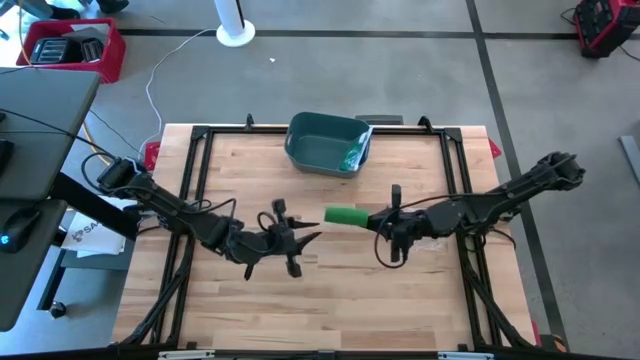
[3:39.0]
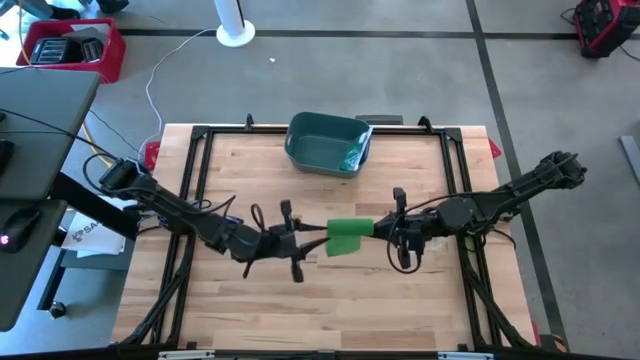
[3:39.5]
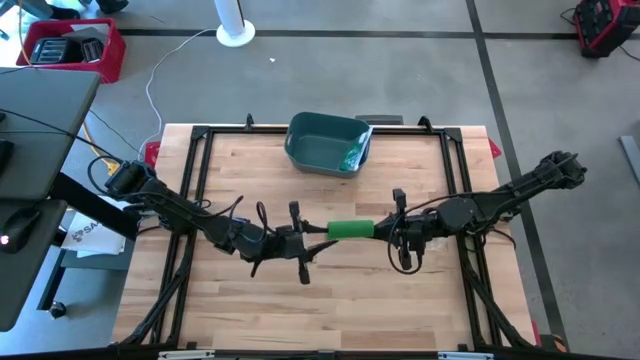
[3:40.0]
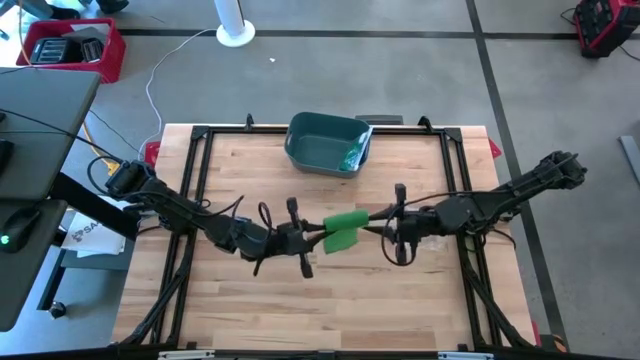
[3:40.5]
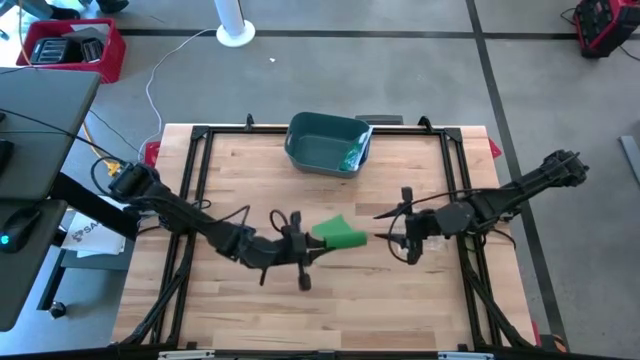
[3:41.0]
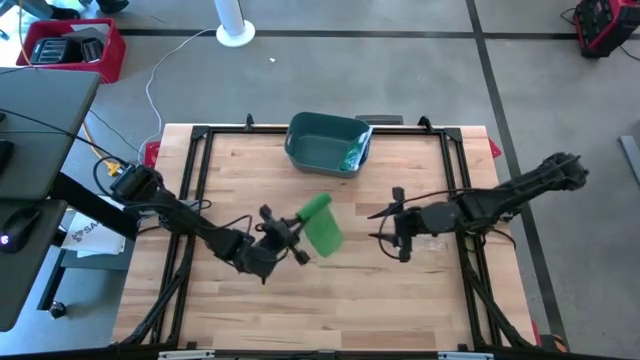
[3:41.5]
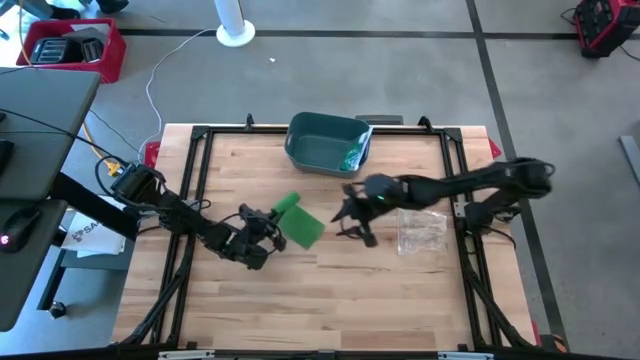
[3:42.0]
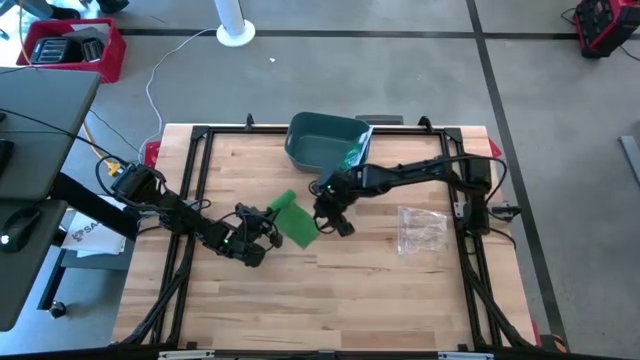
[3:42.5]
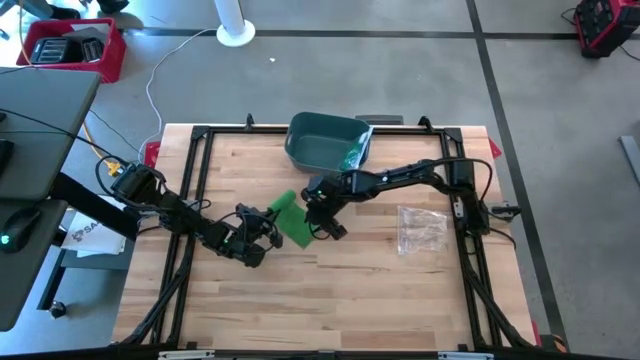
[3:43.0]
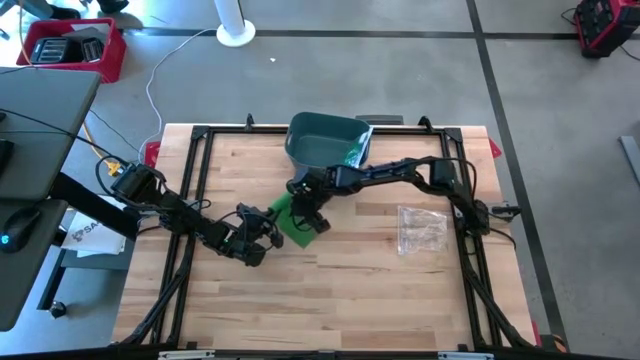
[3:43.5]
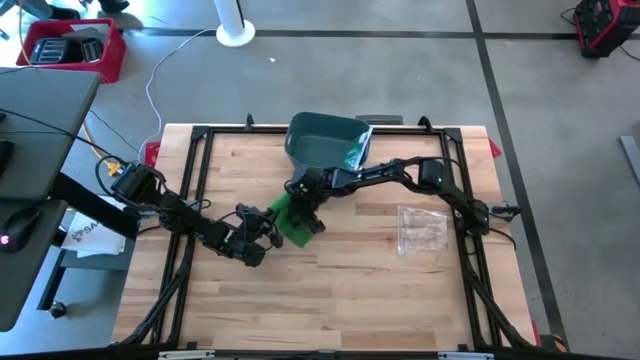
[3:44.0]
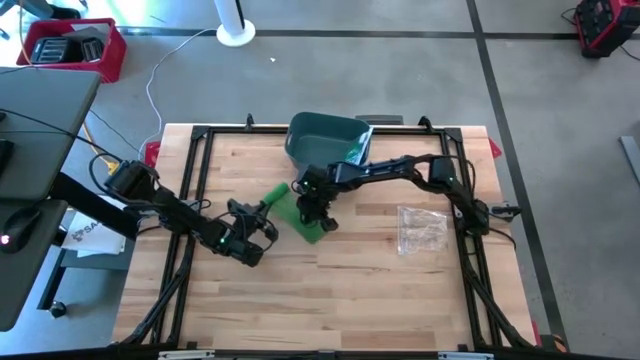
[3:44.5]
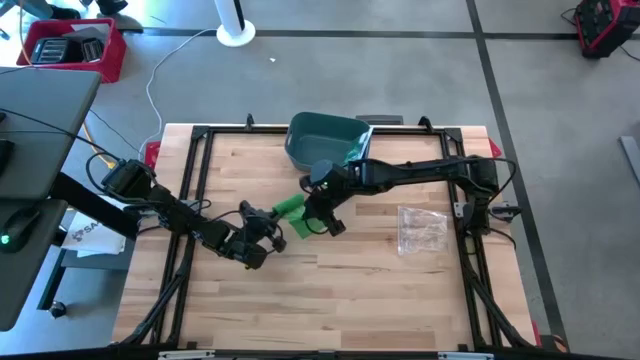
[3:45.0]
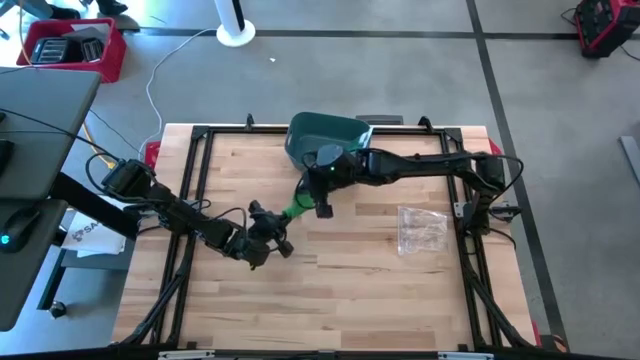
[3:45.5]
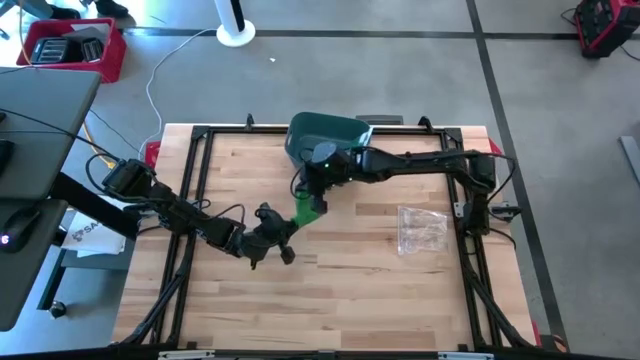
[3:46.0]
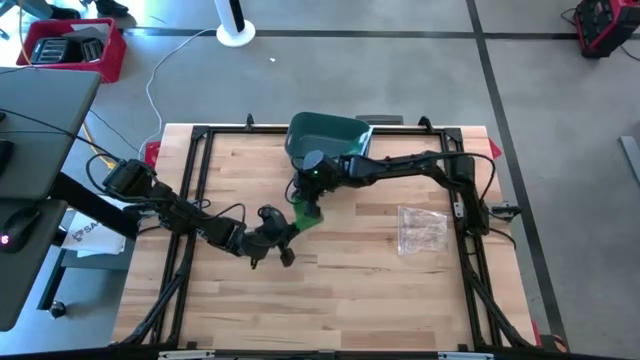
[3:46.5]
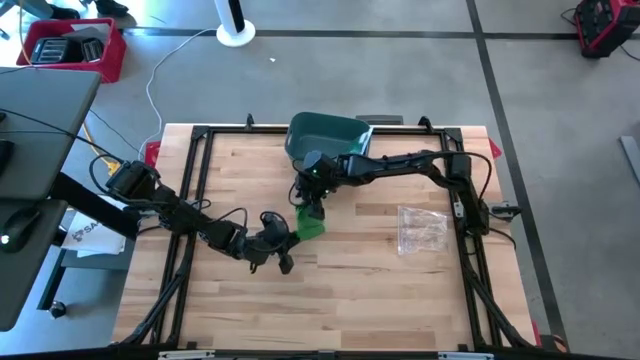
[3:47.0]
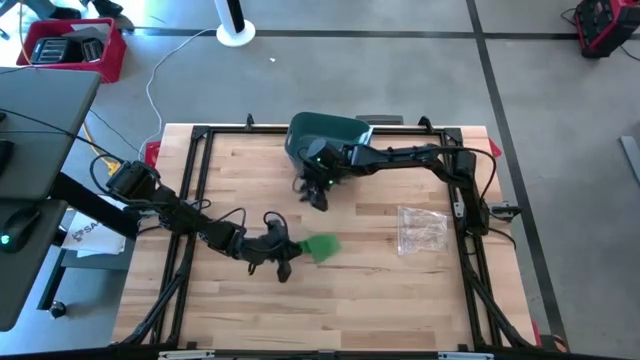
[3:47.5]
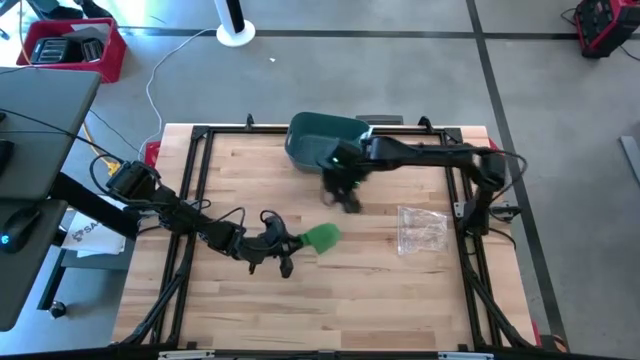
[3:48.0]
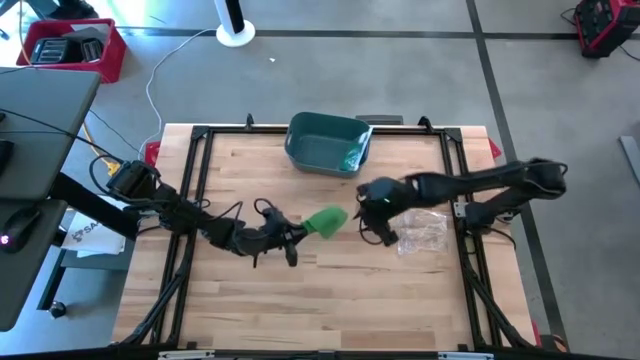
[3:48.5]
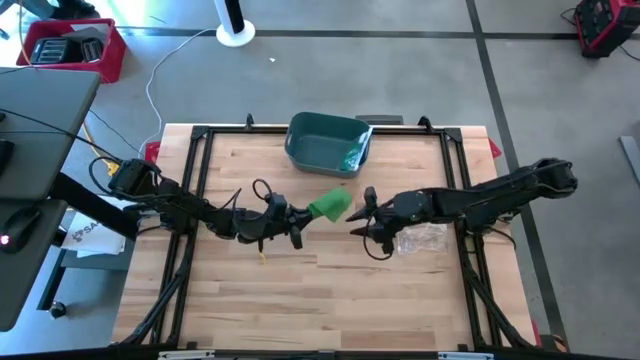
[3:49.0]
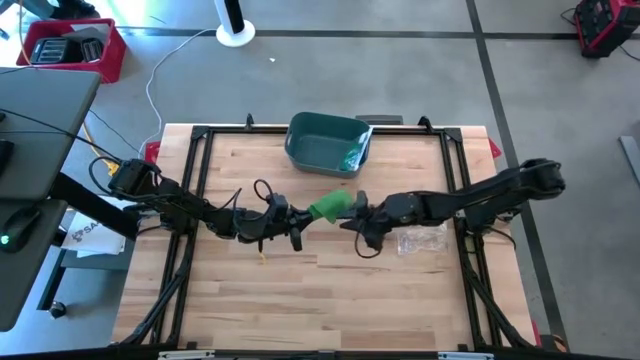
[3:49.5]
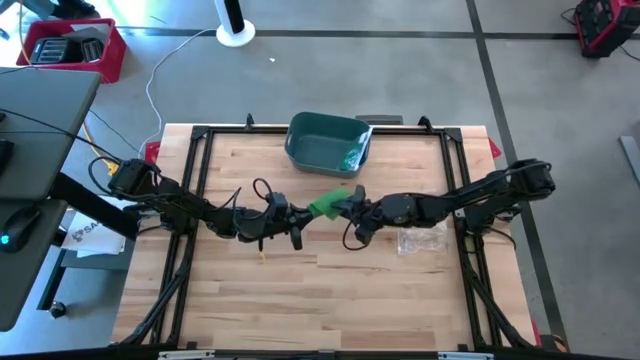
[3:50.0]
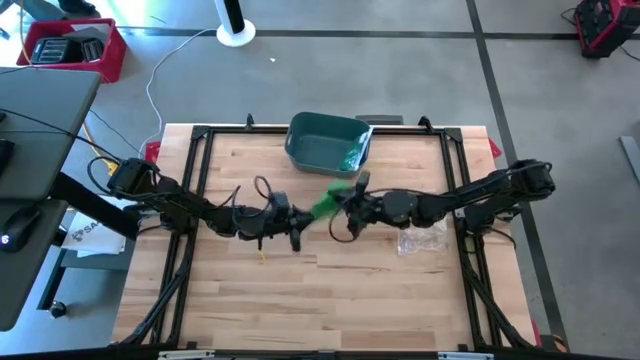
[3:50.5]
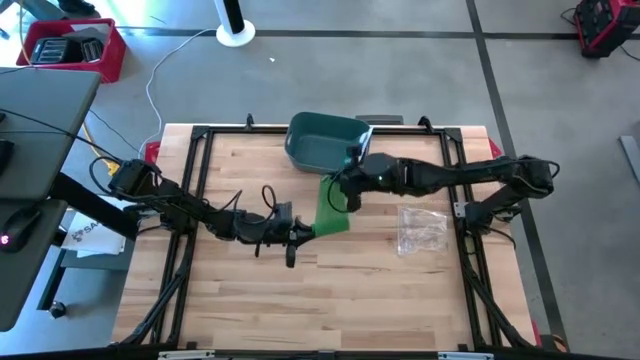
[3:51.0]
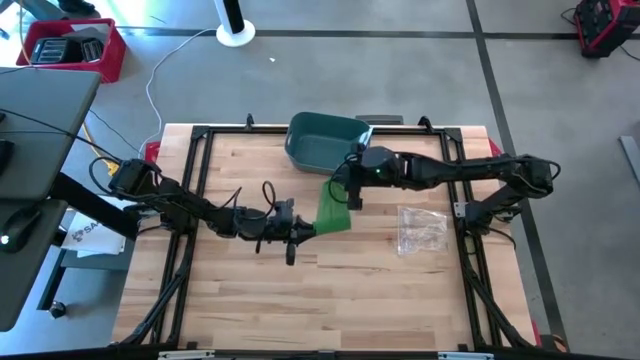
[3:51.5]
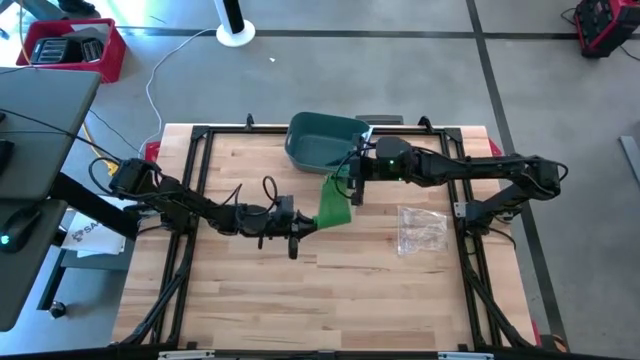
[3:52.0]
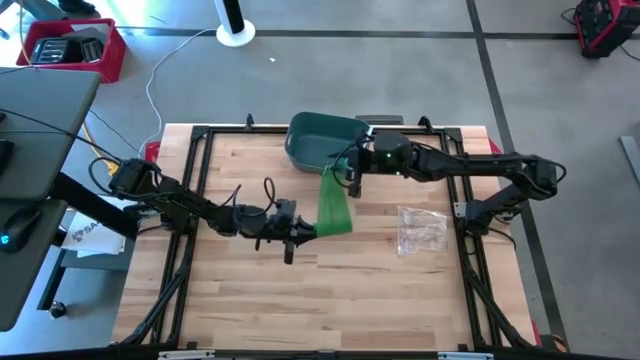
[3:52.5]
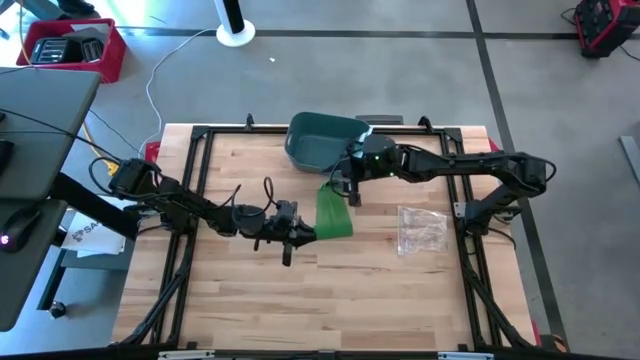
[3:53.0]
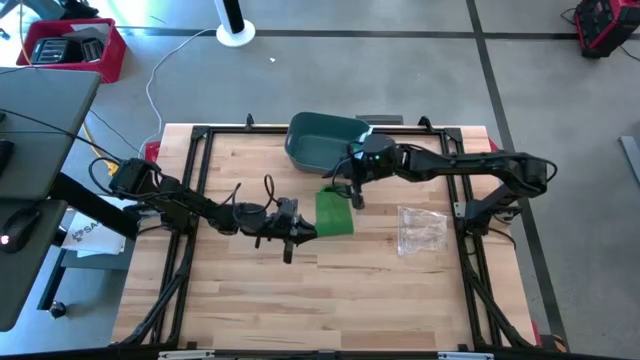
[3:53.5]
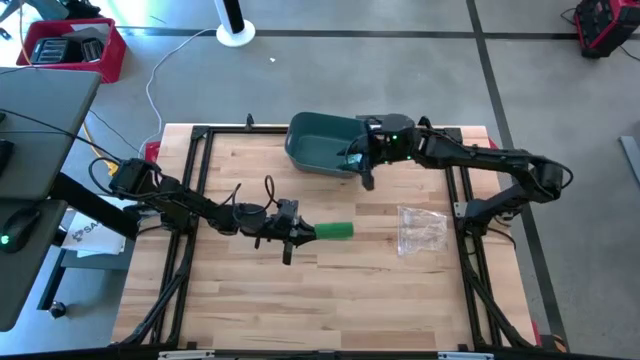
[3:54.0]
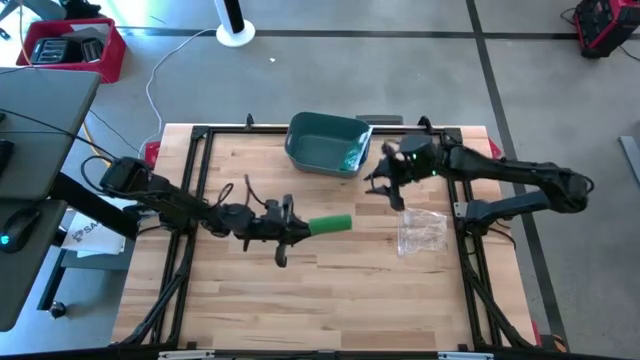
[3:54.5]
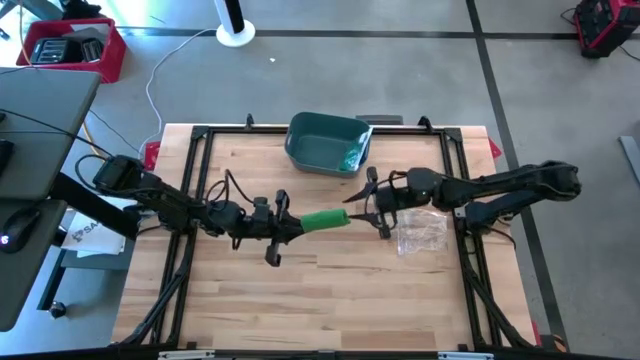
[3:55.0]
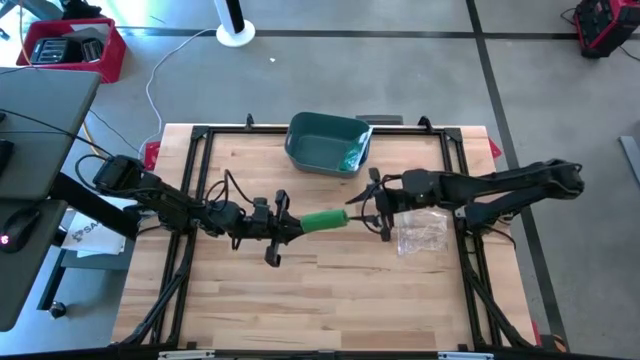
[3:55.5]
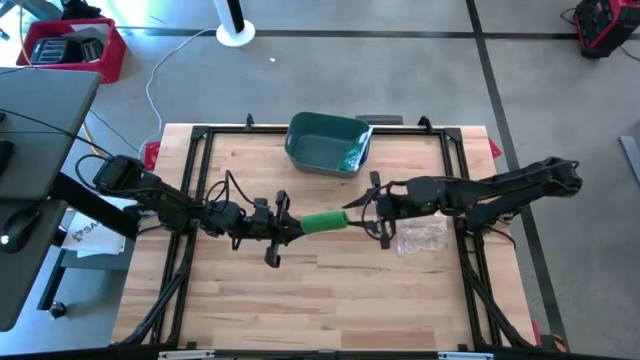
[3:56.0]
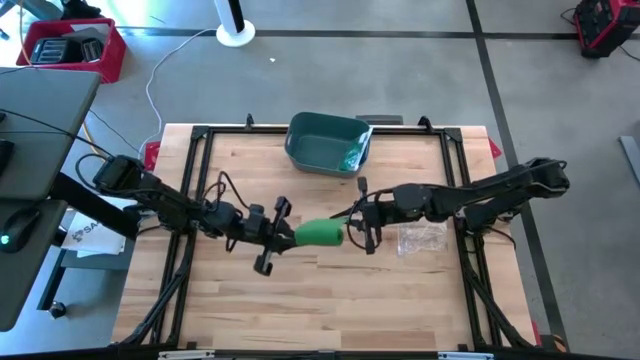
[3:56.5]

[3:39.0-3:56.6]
Task: Roll bandage
Roll the green bandage

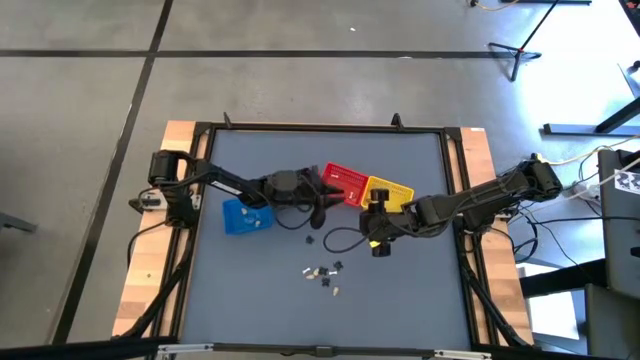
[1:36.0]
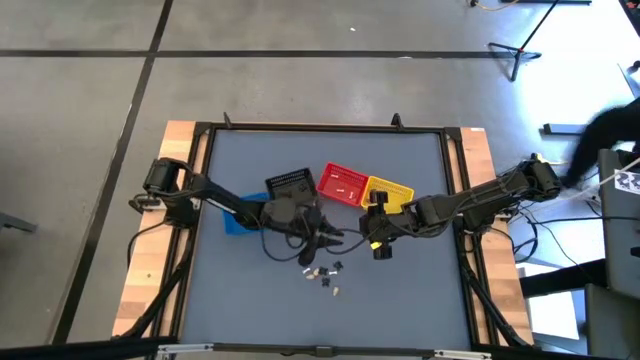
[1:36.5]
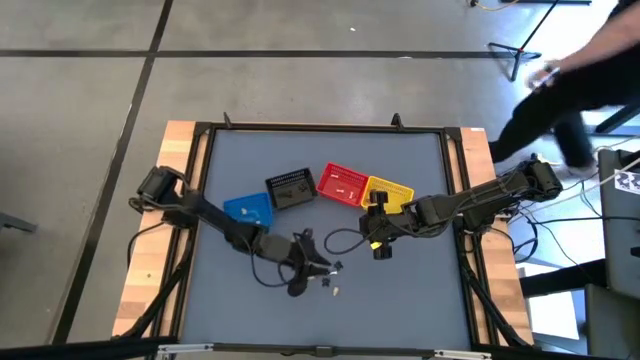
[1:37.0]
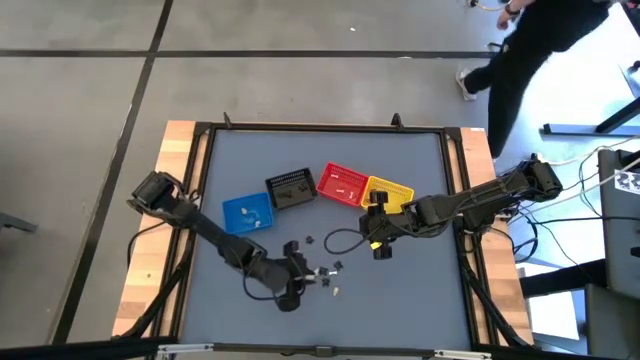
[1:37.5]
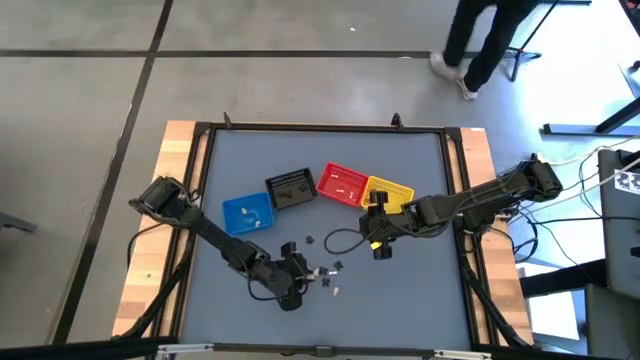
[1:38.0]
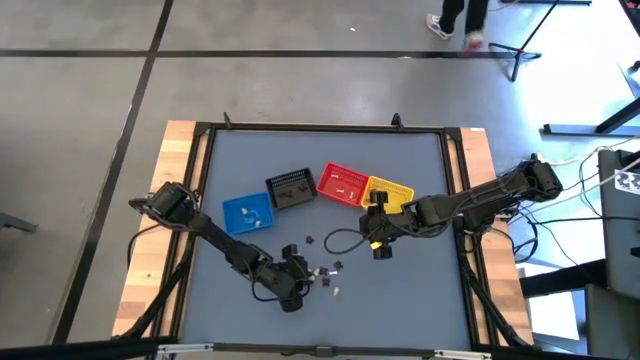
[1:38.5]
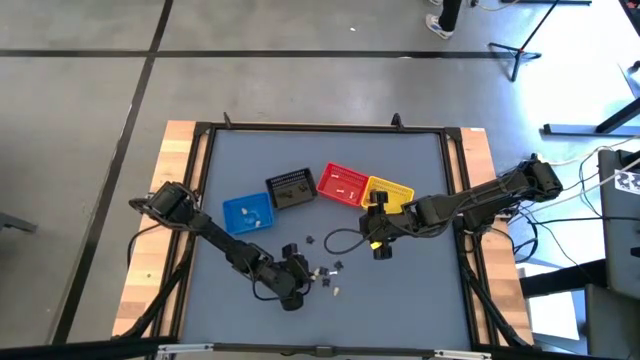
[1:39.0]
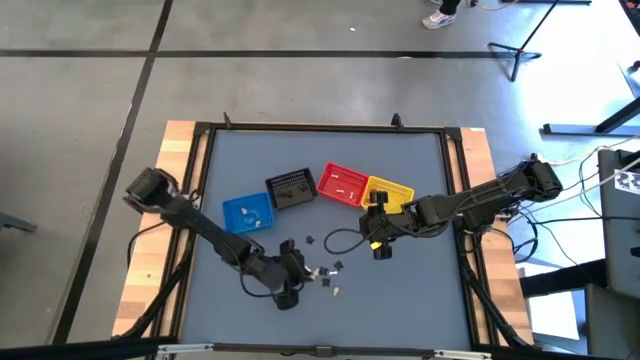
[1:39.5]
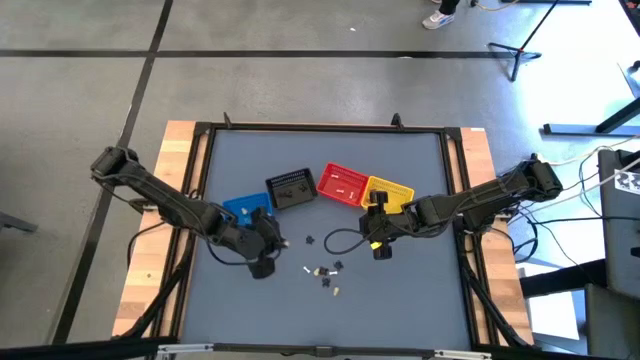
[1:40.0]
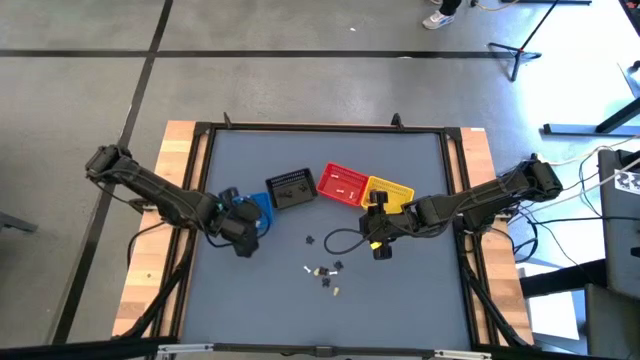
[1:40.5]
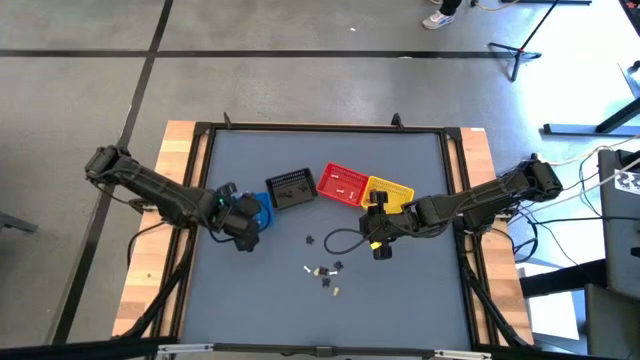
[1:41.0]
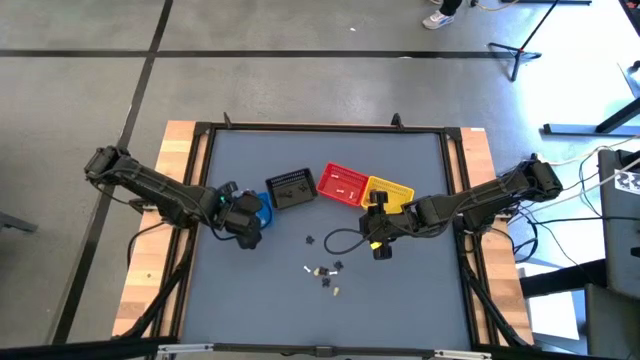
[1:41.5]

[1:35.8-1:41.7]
Task: Sort Halloween decoration
Put the yellow skull toy into the blue bin
